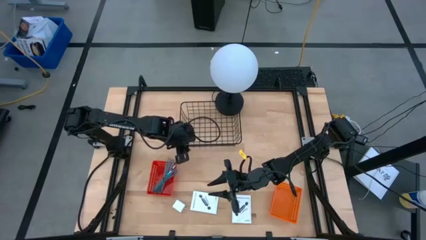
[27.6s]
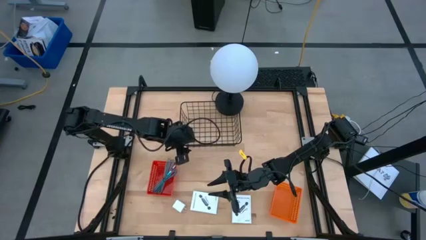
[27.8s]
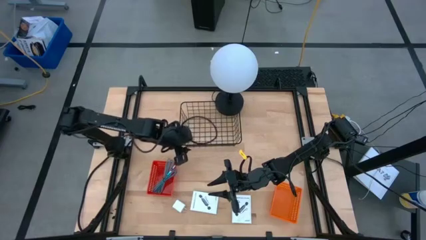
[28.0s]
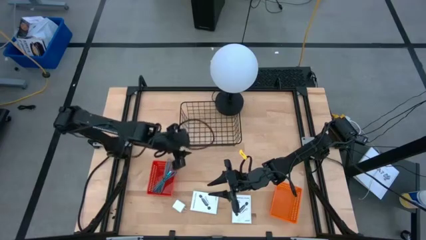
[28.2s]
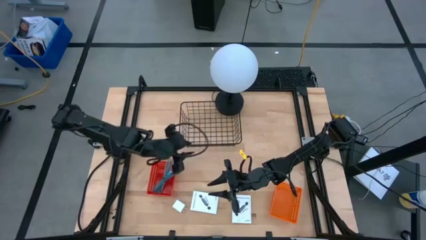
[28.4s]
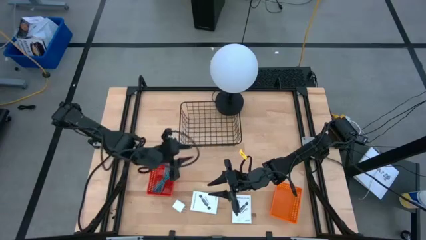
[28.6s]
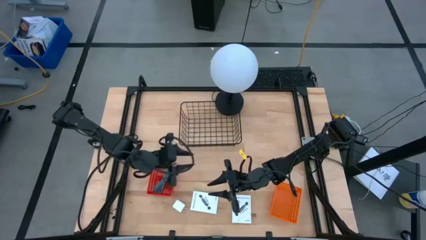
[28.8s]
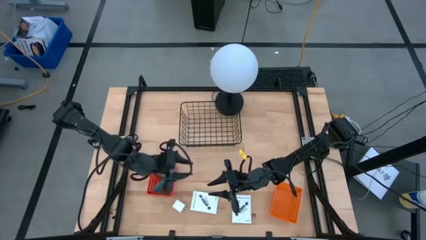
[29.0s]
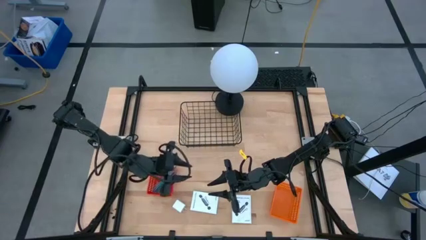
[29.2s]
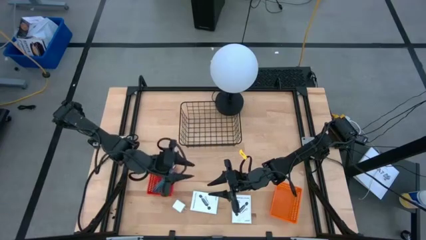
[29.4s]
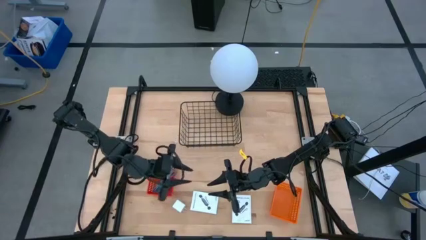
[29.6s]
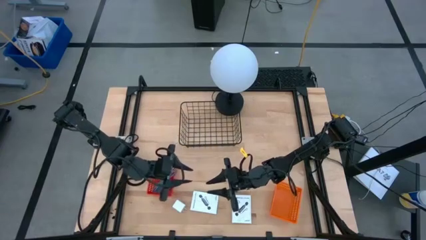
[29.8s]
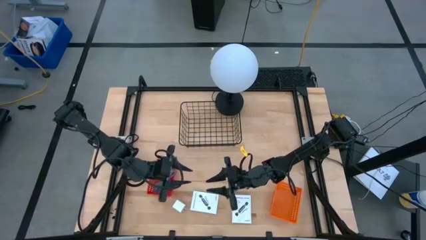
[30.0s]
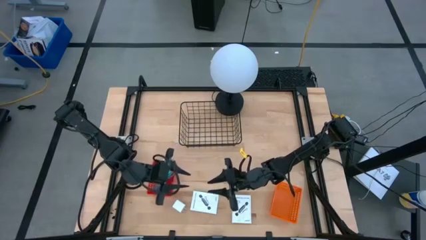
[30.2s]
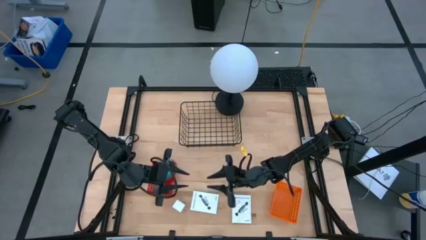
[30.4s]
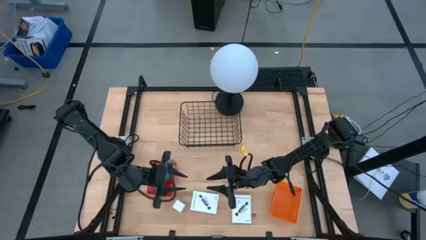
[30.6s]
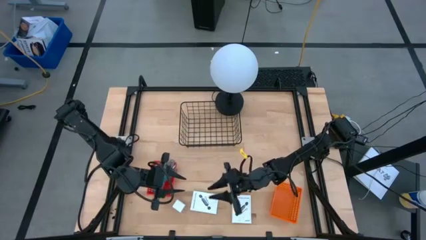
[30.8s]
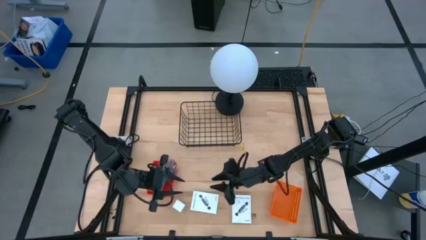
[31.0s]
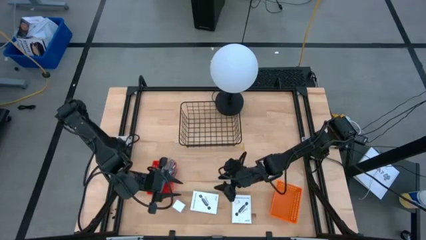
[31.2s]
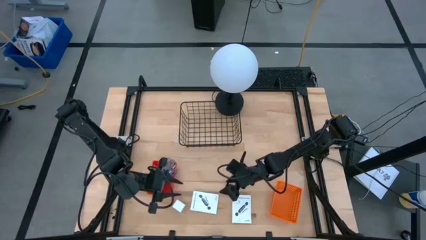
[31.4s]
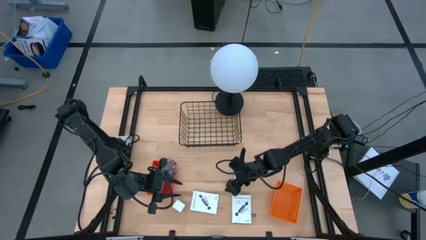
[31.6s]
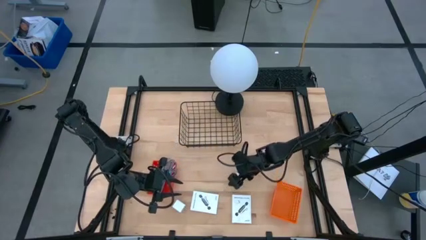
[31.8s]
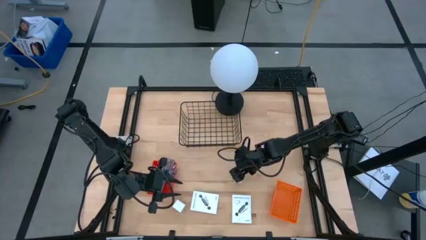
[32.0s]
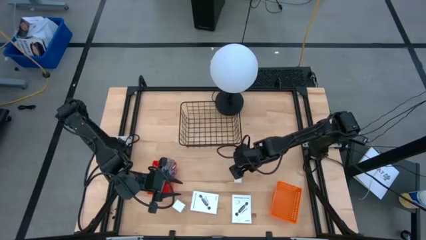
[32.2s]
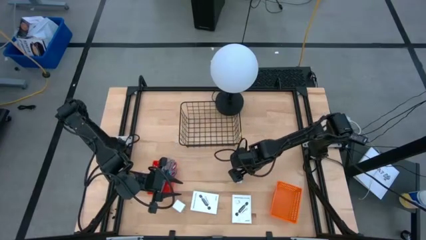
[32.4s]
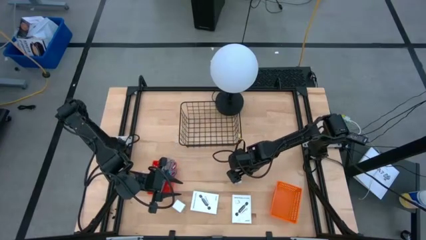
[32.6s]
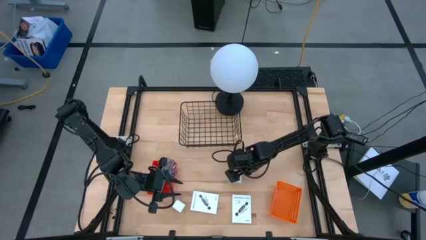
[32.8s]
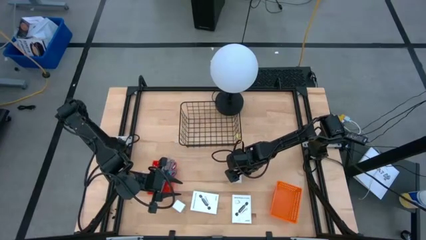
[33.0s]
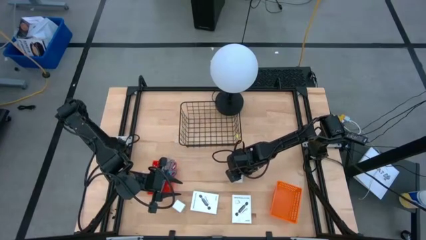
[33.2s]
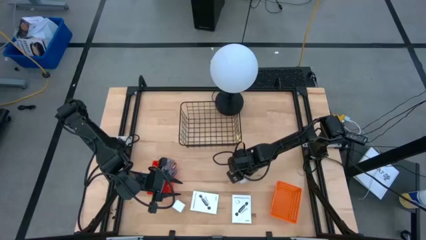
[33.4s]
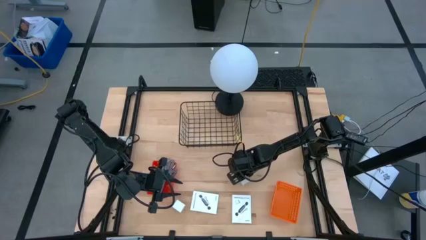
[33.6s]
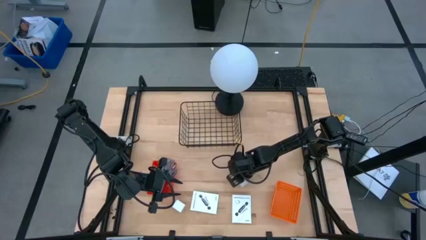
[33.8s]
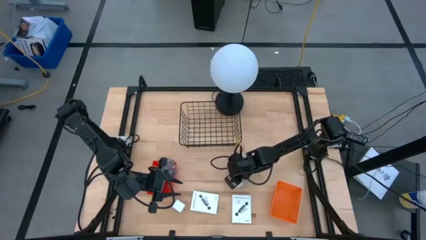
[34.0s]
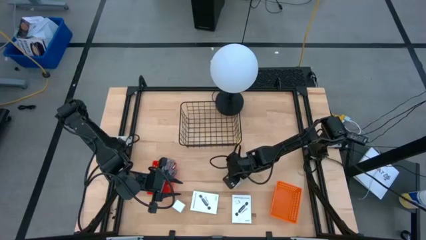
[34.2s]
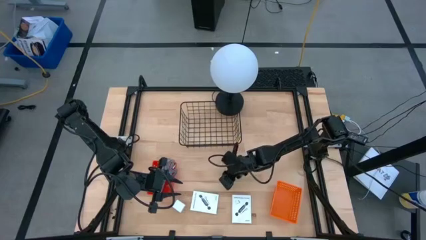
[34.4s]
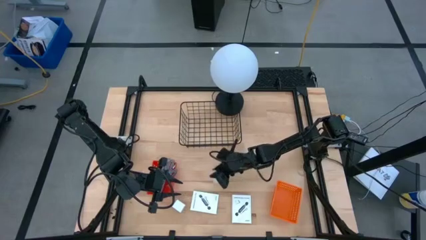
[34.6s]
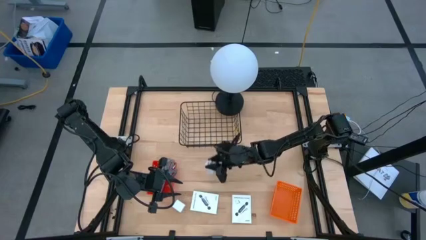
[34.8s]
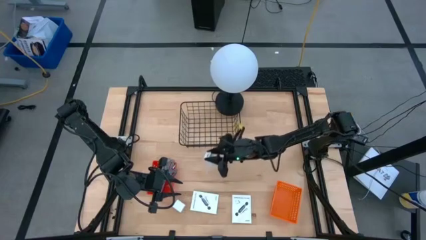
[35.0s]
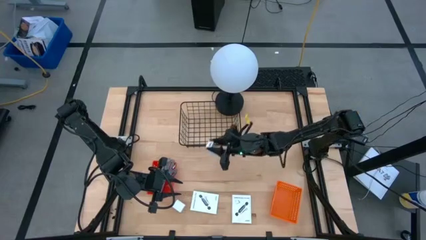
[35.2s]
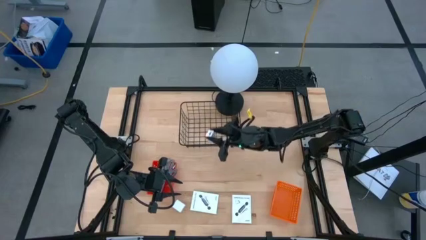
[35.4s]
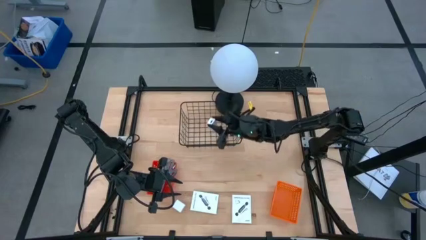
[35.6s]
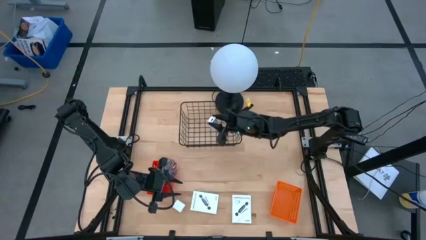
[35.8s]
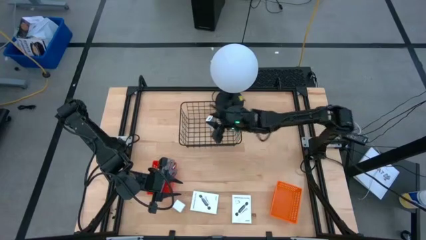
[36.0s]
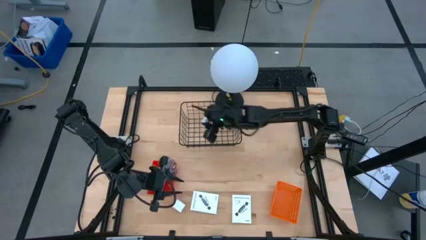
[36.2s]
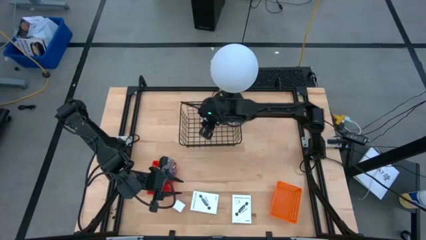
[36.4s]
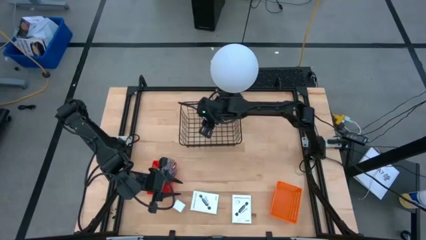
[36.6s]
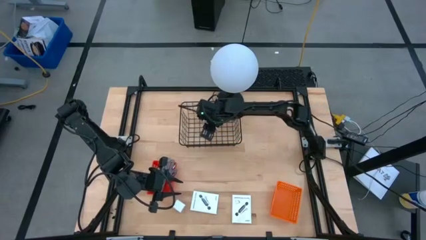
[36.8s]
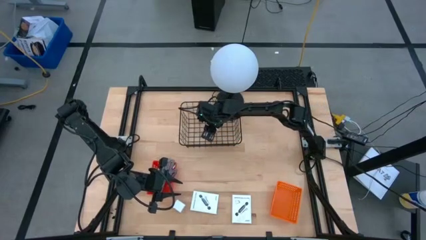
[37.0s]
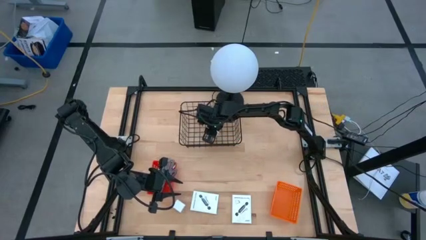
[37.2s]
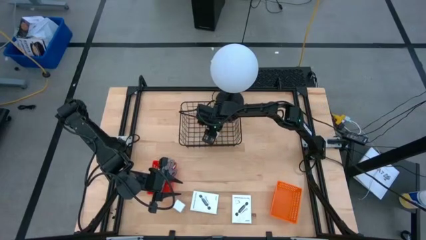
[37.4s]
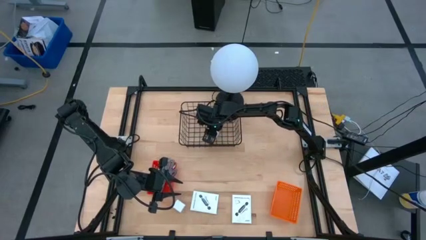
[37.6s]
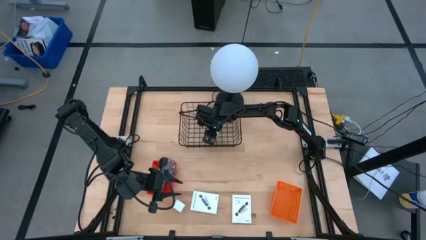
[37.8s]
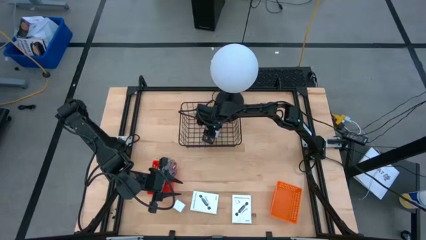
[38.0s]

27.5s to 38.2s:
Task: Pick and place items into bin
Put the top white charger adapter into the wire basket

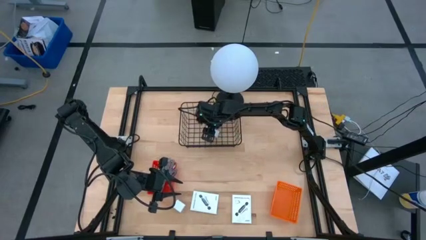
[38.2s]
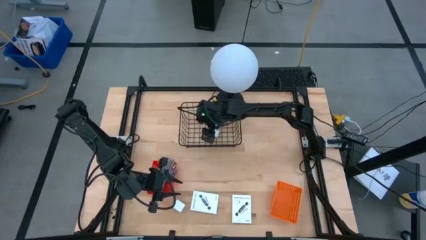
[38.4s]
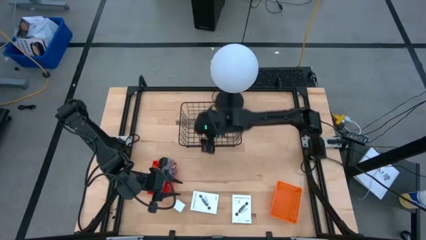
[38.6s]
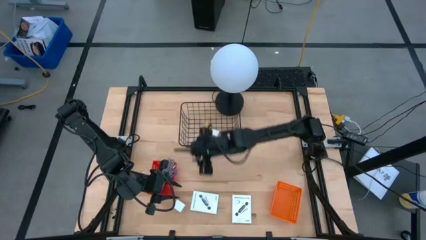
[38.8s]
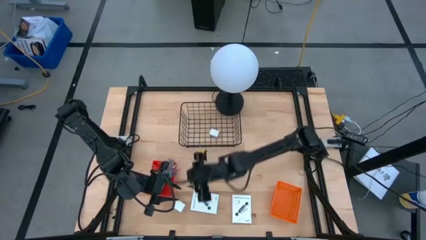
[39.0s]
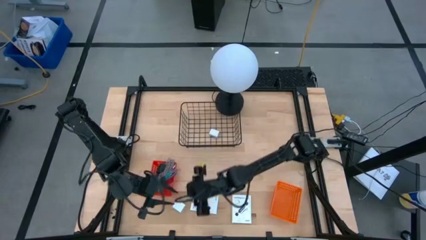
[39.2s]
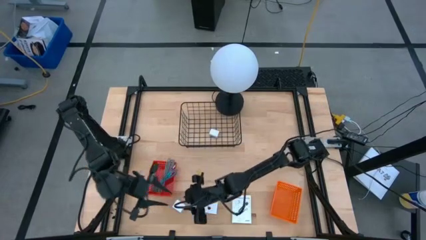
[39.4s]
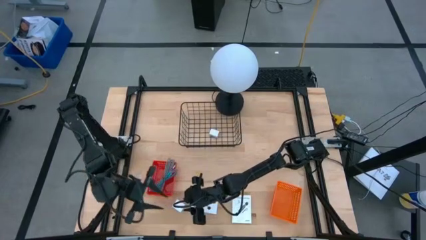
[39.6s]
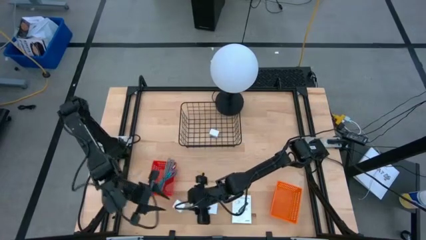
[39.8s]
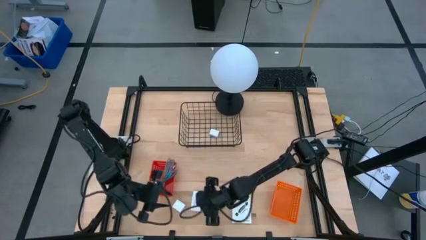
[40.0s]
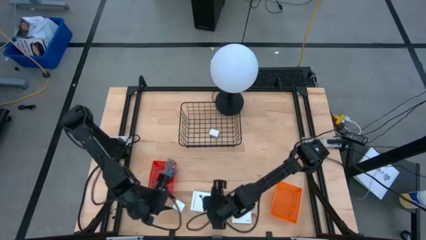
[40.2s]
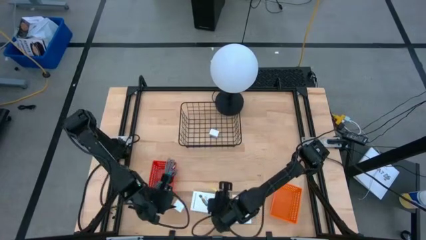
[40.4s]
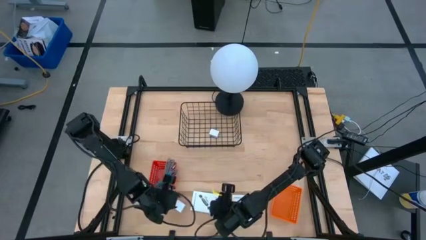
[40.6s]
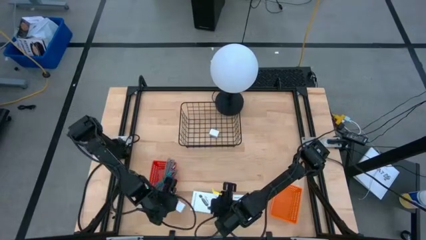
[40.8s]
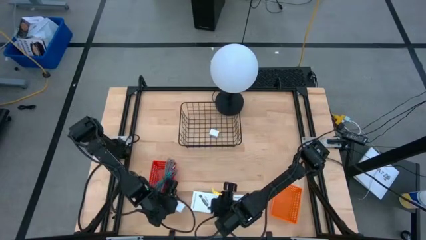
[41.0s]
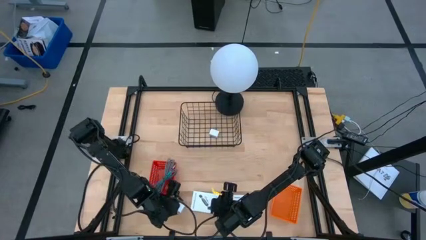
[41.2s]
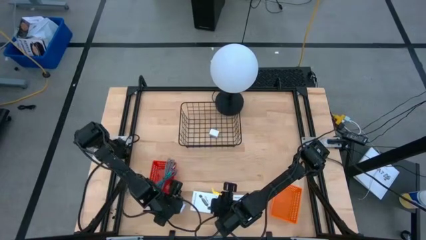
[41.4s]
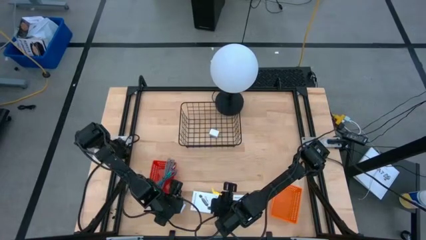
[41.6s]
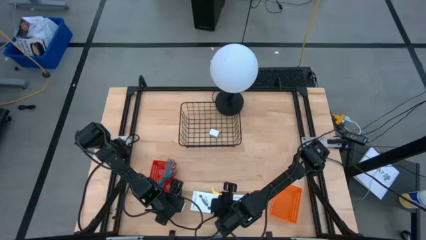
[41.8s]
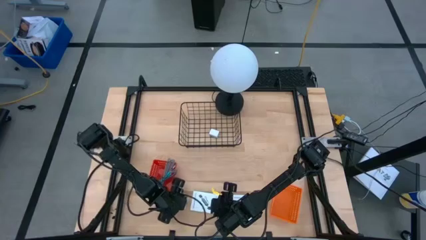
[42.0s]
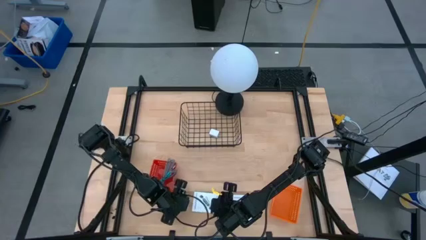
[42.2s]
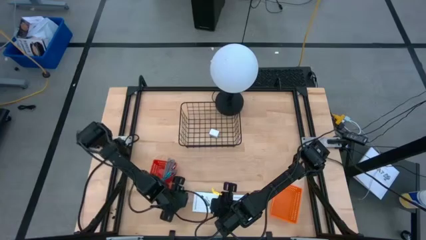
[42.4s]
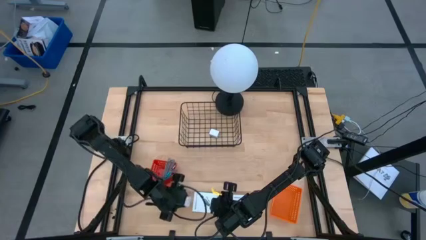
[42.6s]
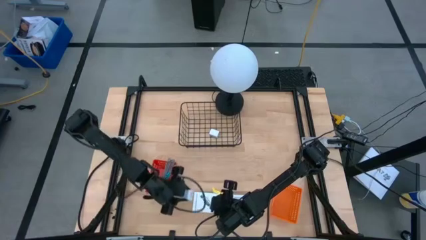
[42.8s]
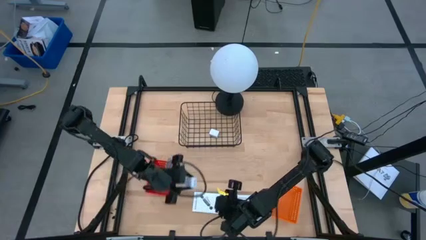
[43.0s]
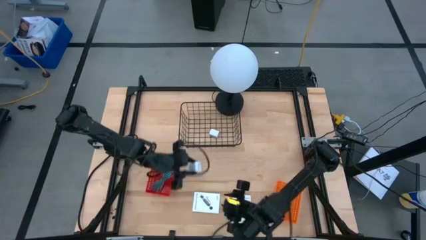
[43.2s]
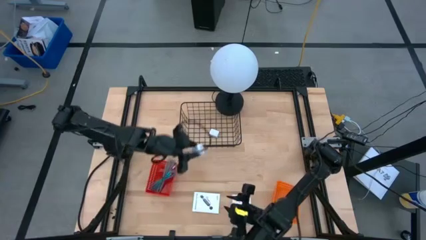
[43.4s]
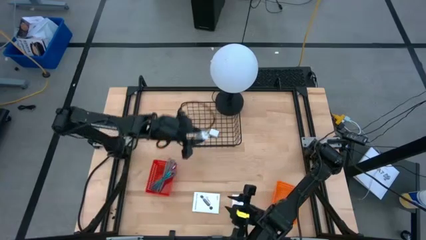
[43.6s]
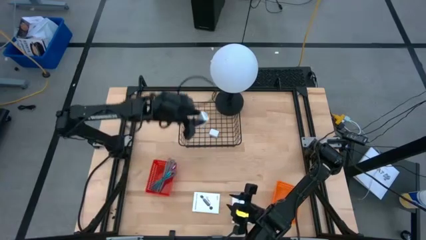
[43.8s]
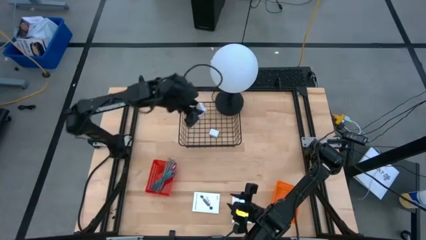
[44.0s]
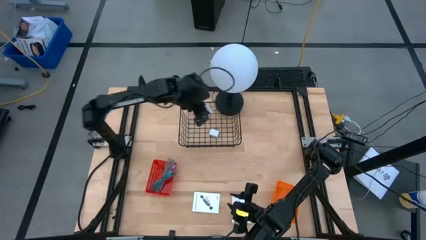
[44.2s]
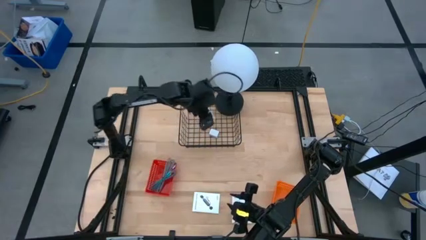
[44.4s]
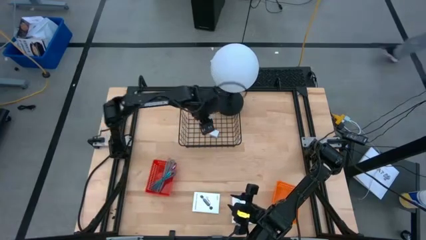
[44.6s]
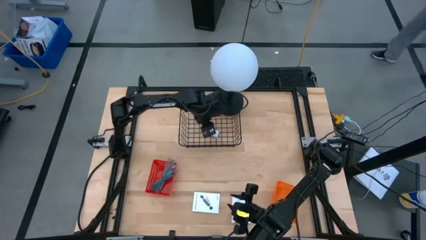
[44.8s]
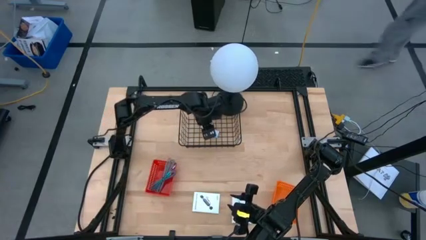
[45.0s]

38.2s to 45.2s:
Put the white charger adapter into the wire basket
